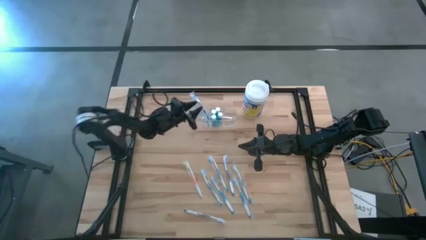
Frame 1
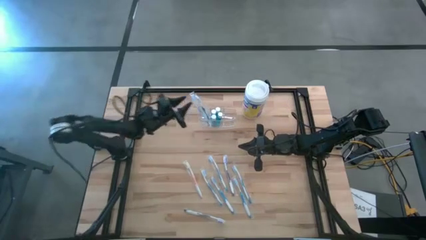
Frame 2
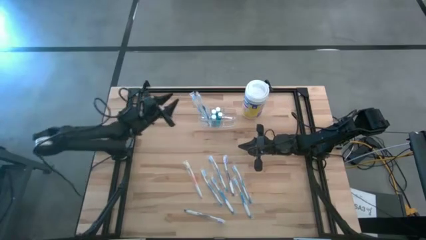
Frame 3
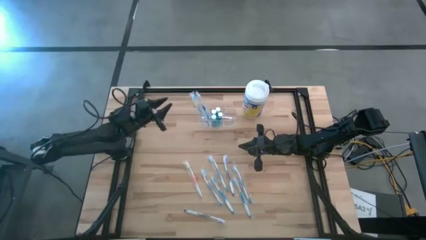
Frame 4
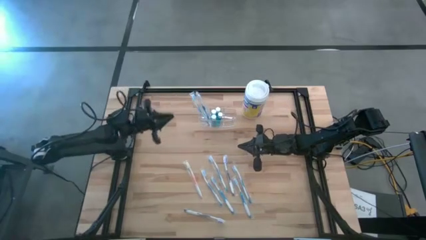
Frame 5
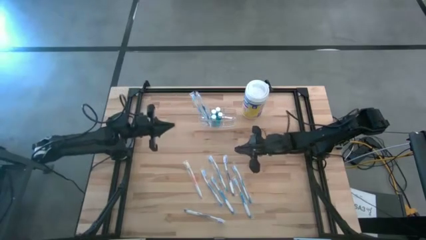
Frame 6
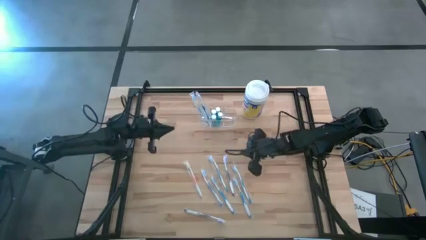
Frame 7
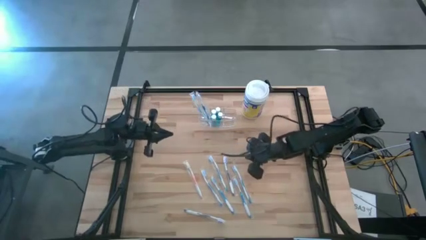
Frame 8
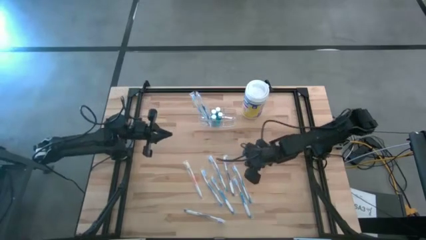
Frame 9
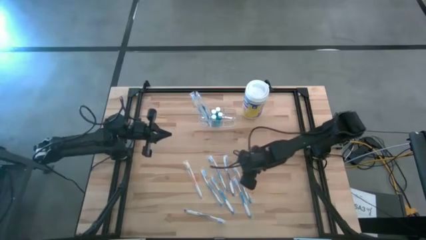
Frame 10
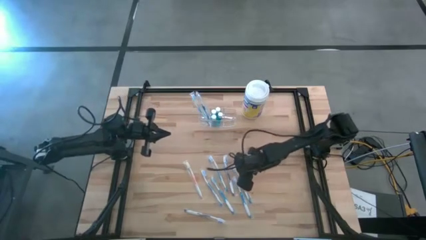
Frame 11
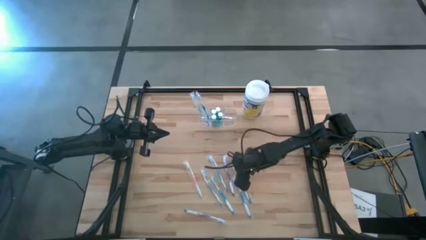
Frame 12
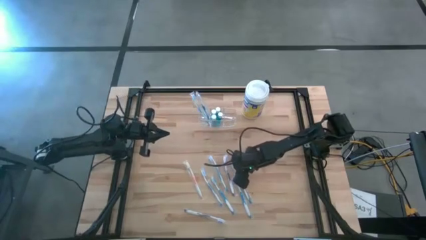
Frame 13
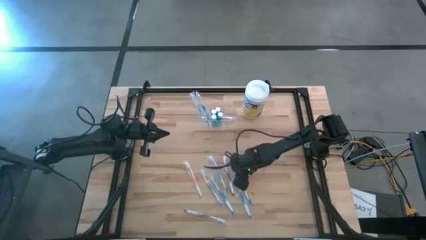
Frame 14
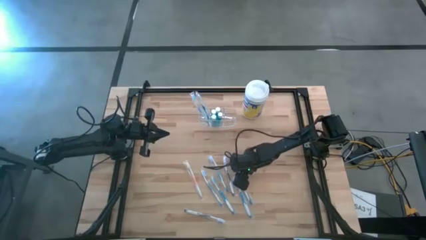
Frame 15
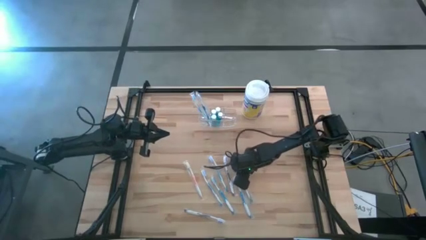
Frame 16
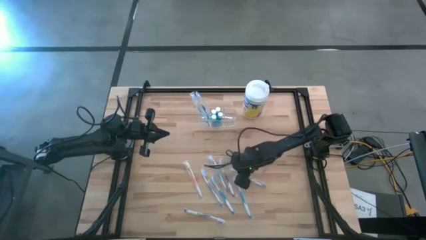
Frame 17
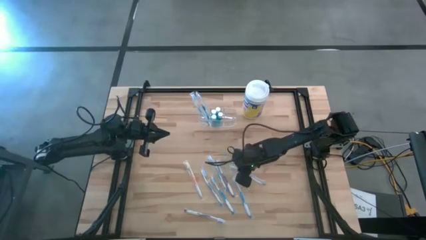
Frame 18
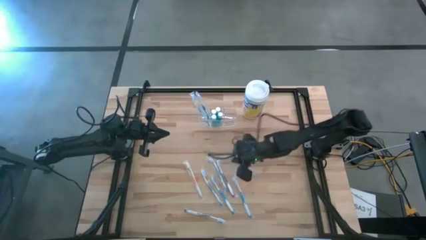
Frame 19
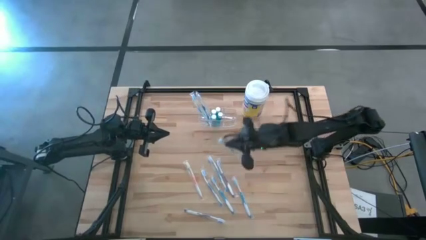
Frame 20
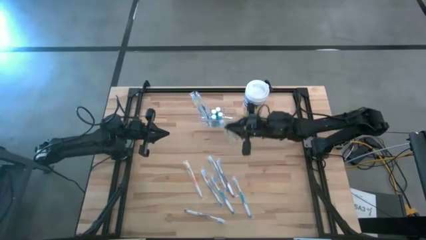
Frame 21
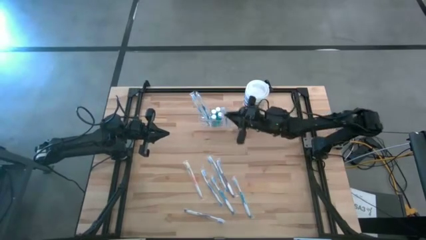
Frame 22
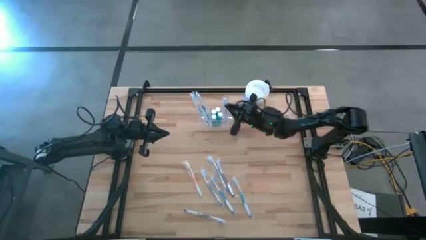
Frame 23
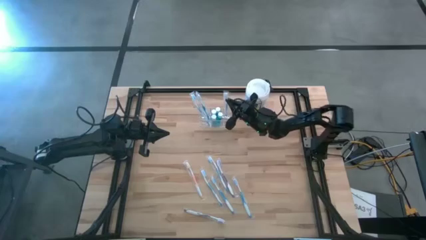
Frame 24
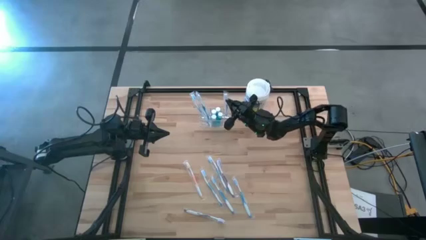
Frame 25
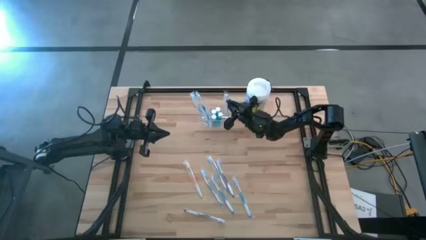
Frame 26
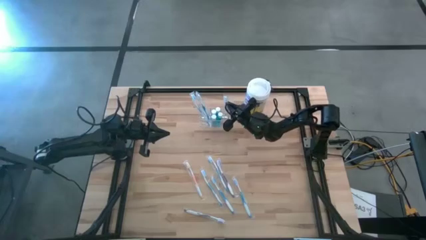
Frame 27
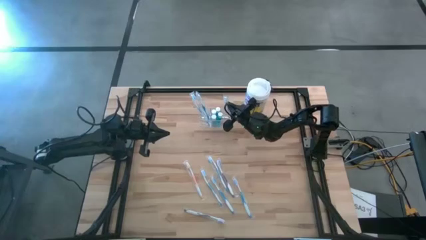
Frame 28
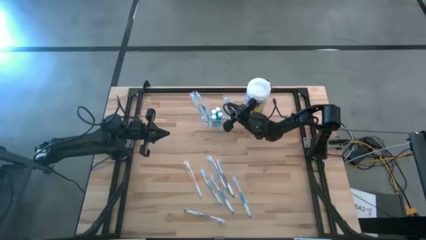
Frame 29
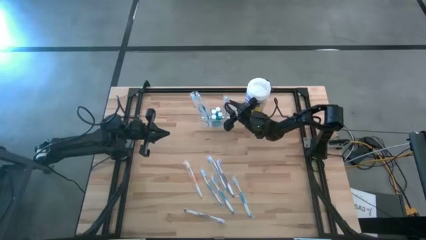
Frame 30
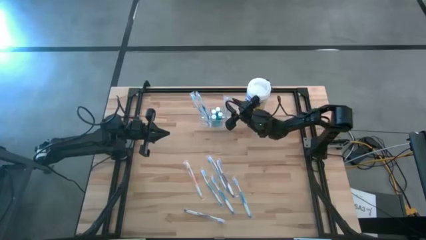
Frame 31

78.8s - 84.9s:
Task: Pick & Place toothbrushing station
Put the blue toothbrush into the transparent toothbrush holder

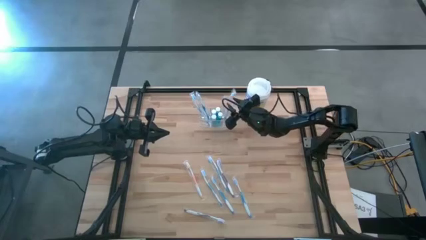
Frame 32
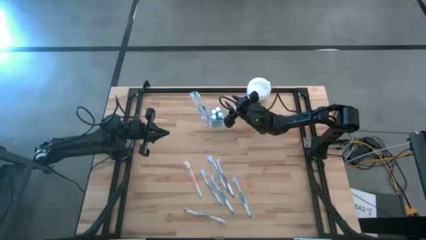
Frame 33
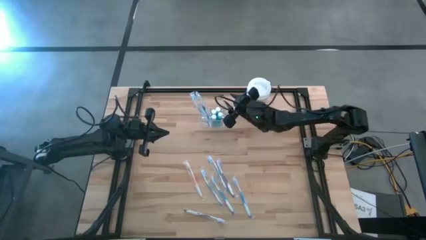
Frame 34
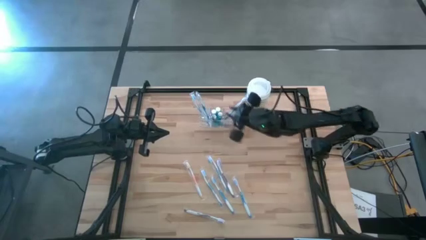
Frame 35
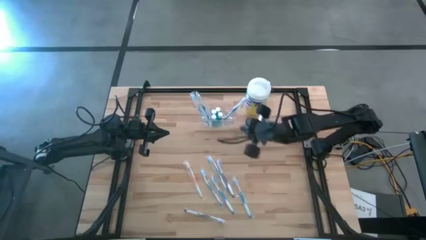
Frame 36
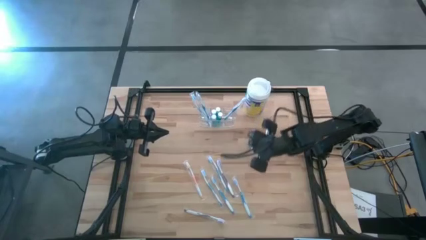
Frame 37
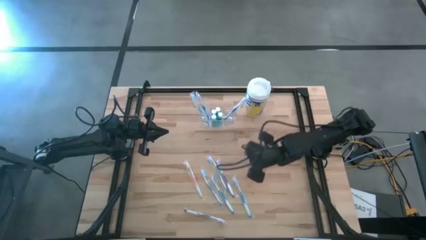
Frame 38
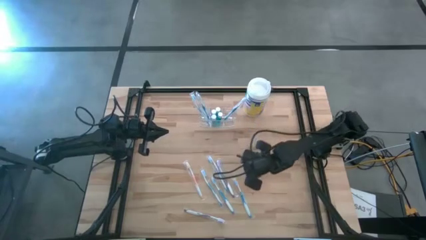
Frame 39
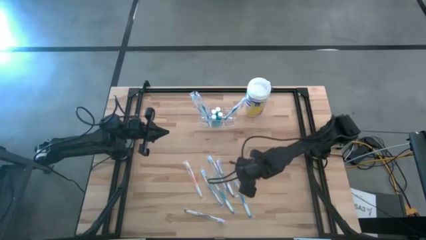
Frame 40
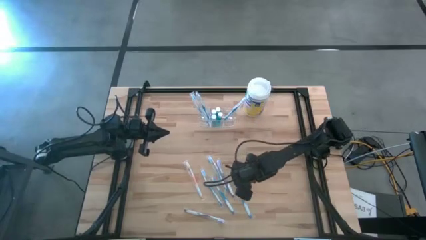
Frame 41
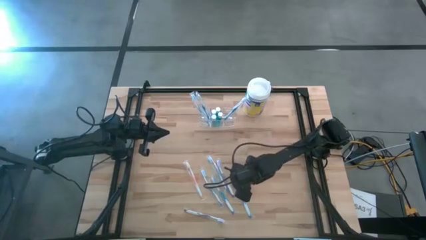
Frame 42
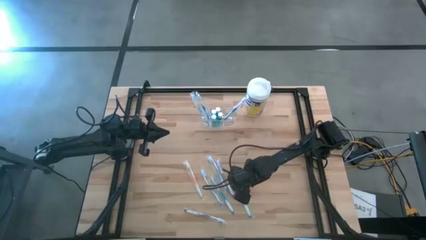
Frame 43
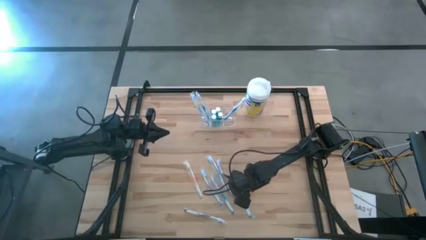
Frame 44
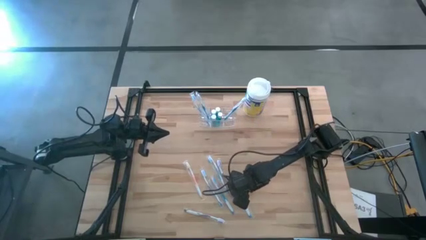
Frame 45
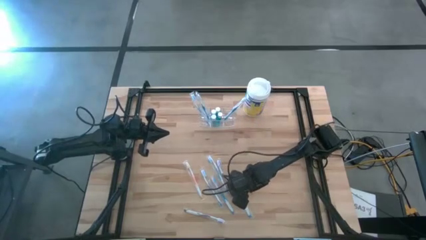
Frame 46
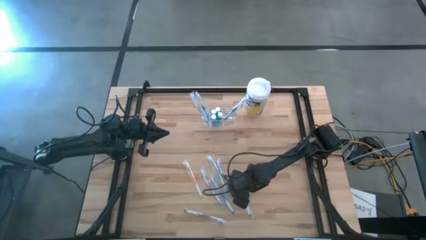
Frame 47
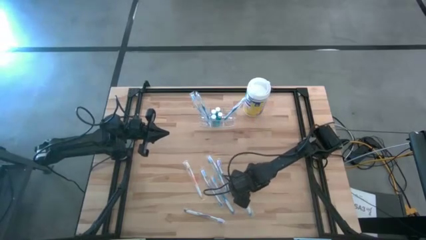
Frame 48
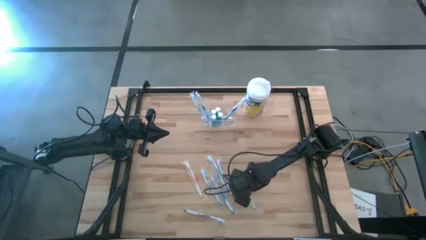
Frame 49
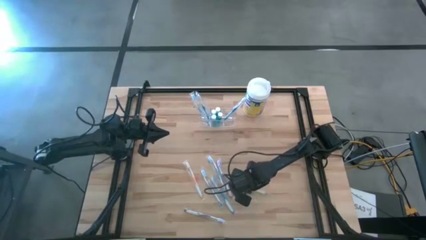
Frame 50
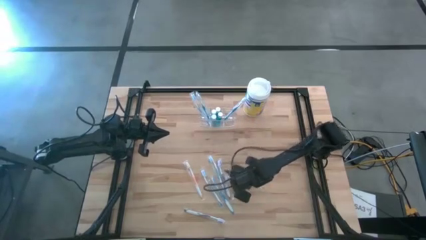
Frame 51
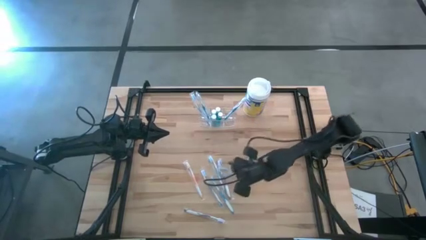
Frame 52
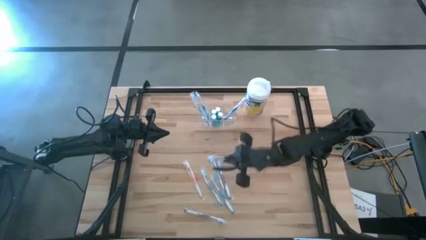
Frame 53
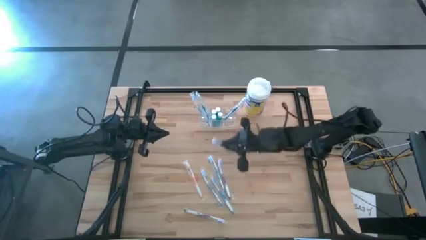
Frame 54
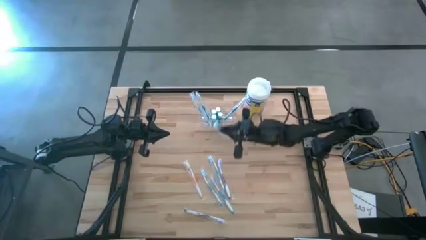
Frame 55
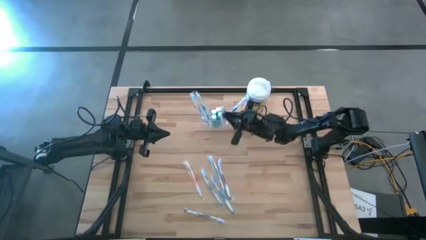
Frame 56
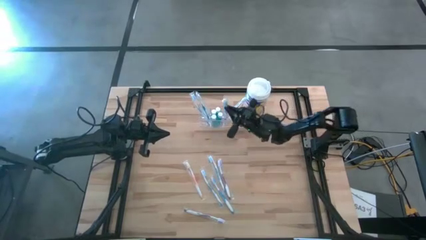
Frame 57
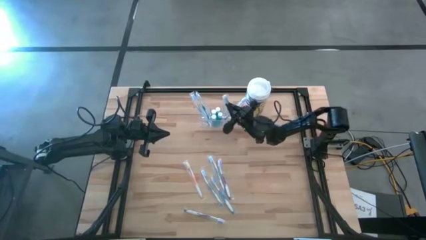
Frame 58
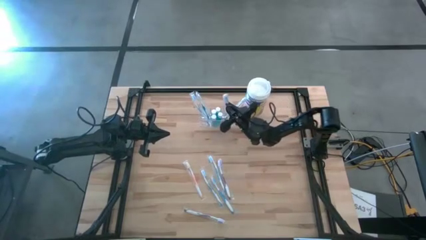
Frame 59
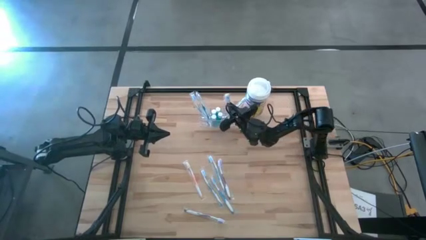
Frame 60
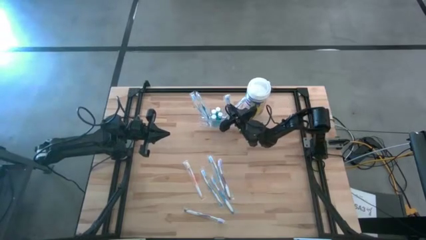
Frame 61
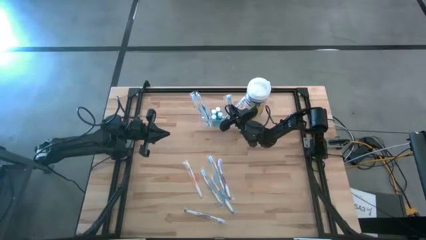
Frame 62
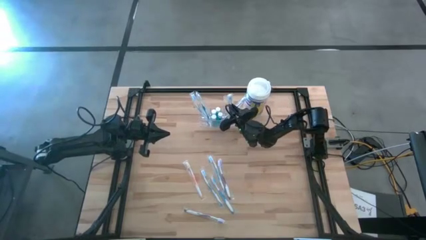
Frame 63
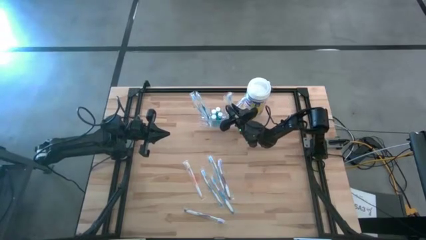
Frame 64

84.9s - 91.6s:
Put the blue toothbrush into the transparent toothbrush holder

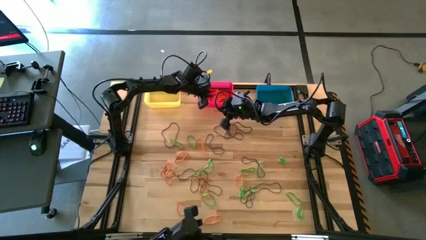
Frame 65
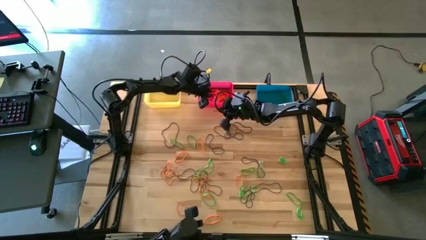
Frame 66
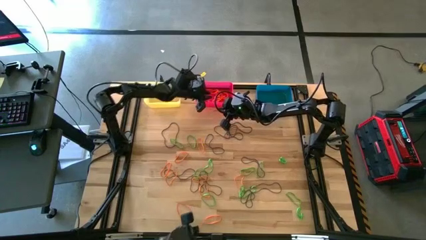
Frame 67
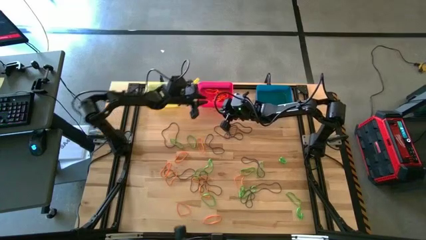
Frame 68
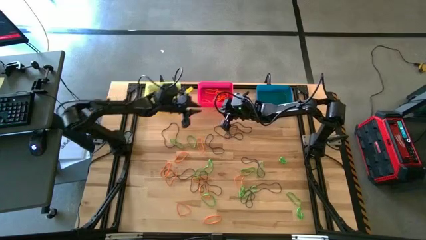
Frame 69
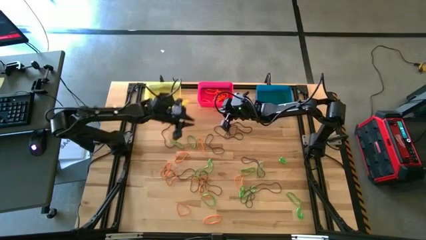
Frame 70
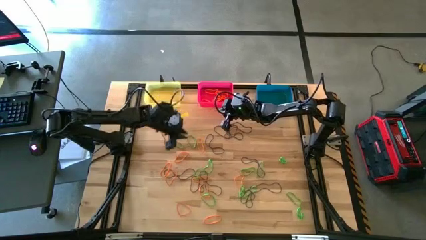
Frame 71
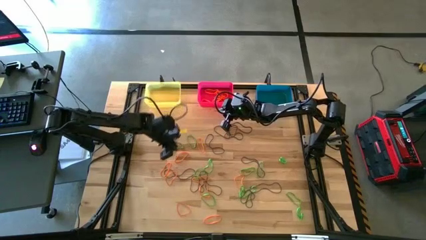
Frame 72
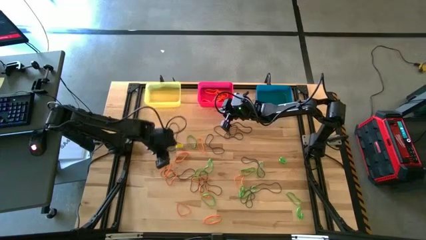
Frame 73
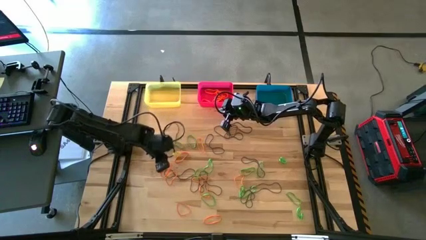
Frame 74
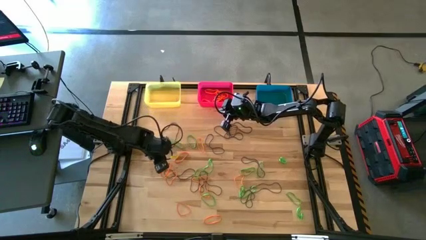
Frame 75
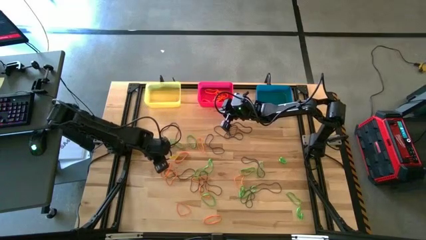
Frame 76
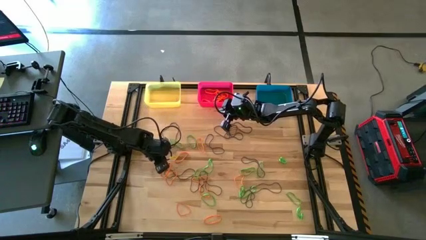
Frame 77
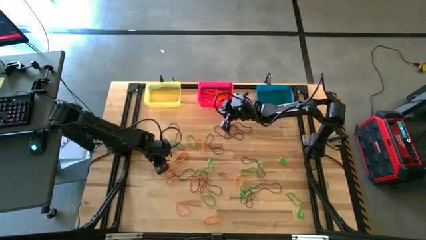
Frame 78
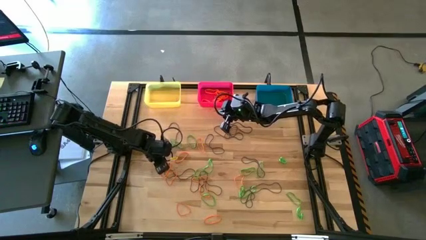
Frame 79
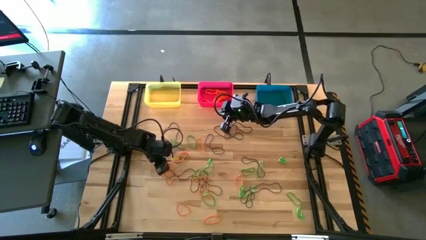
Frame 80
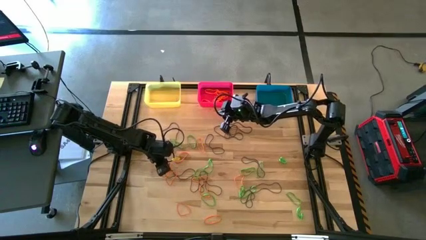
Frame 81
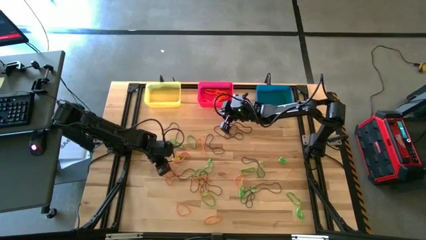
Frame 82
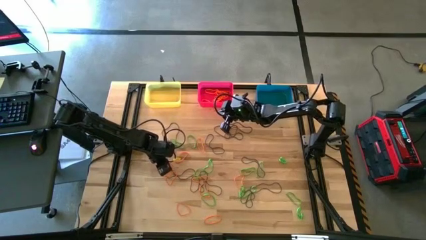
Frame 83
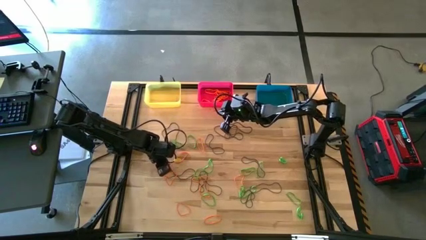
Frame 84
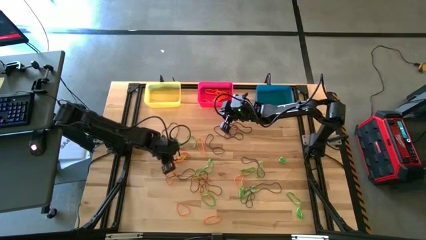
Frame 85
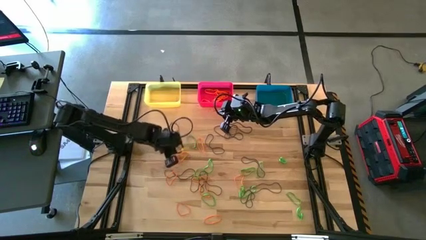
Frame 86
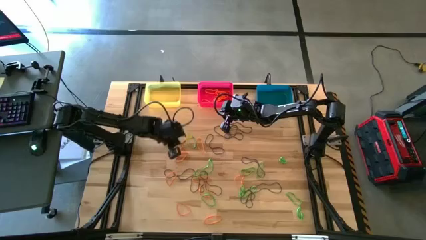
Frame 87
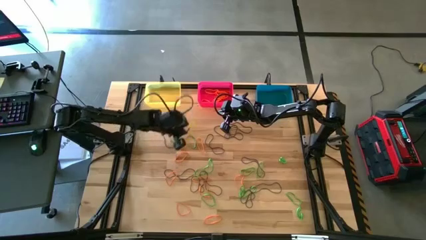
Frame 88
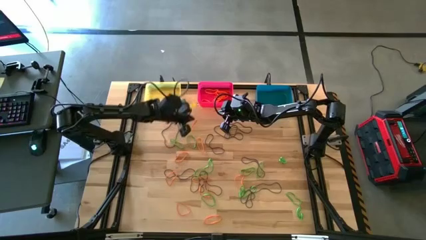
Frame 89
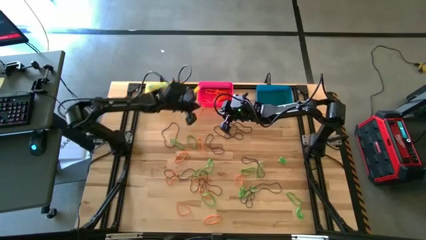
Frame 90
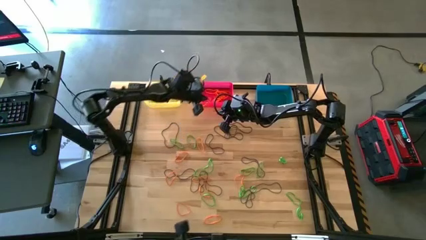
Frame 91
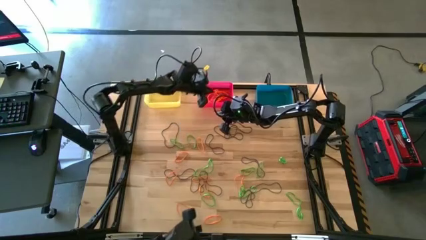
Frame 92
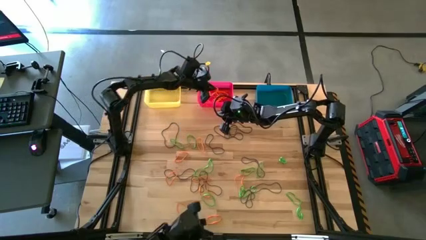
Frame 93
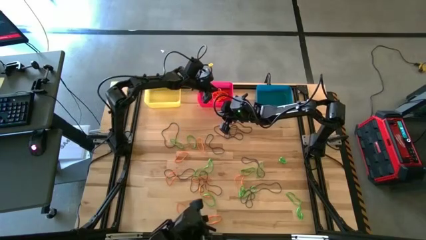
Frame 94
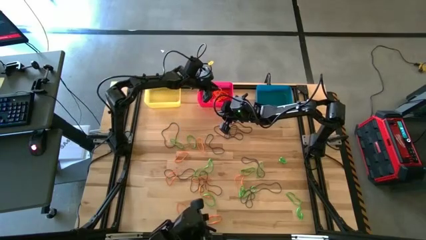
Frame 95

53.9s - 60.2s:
Task: Sort rubber bands into baskets
Put the orange rubber band into the pink bin
